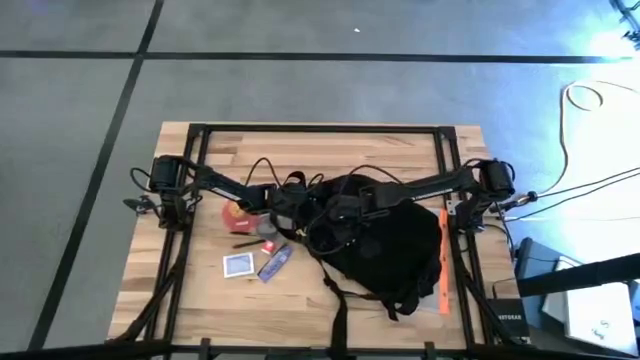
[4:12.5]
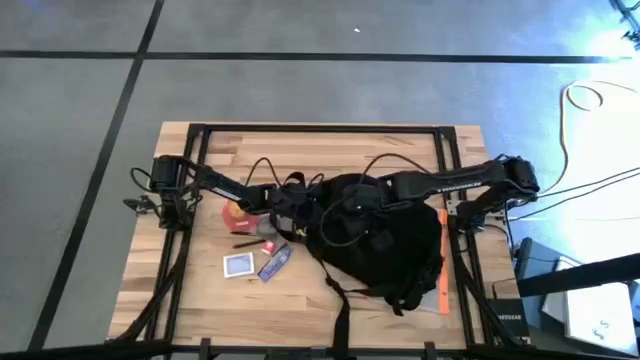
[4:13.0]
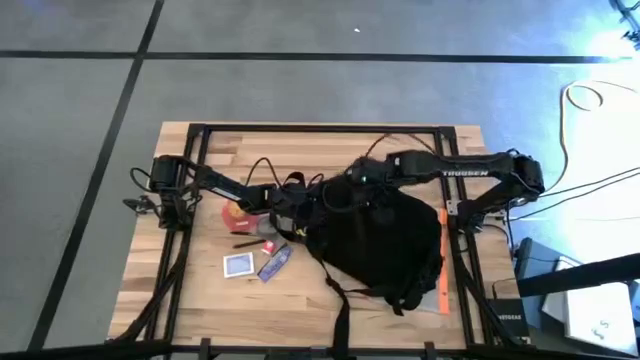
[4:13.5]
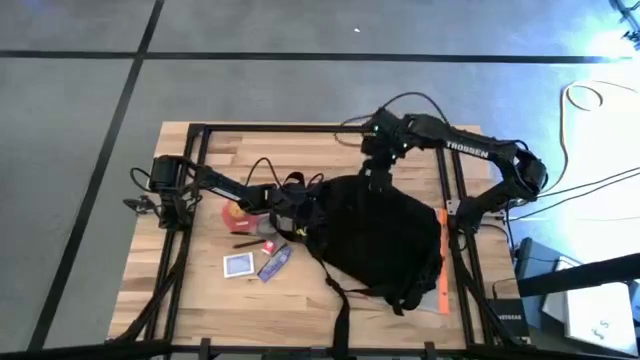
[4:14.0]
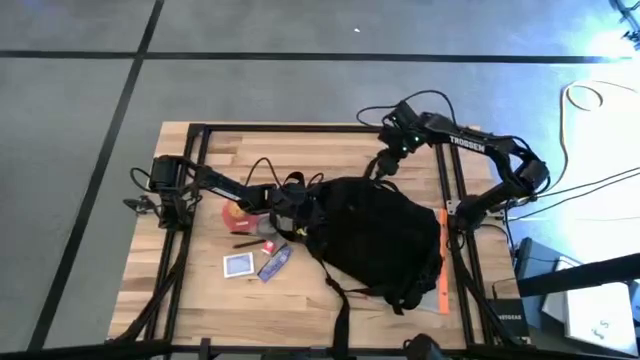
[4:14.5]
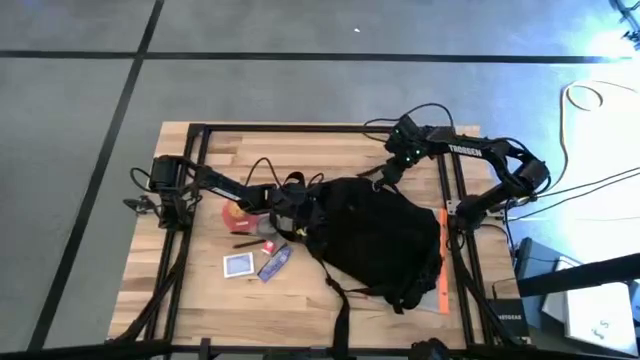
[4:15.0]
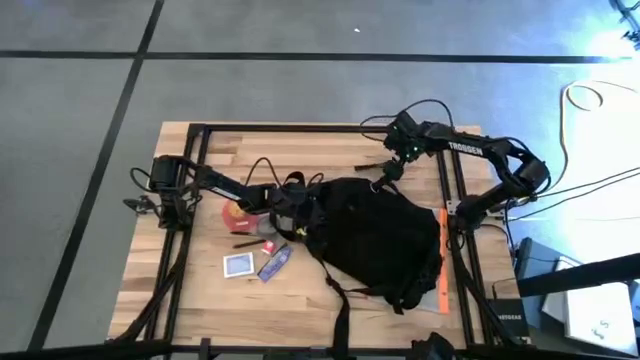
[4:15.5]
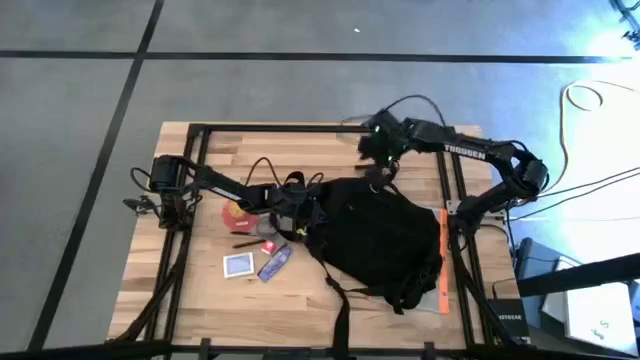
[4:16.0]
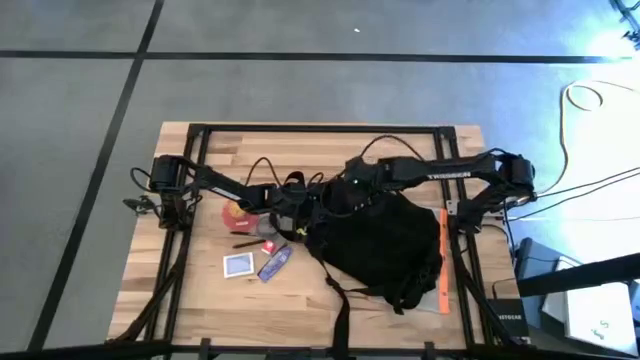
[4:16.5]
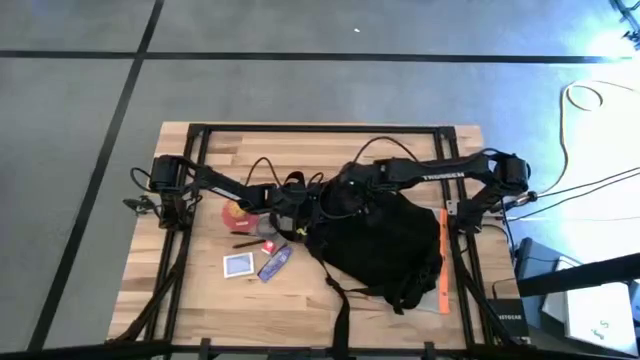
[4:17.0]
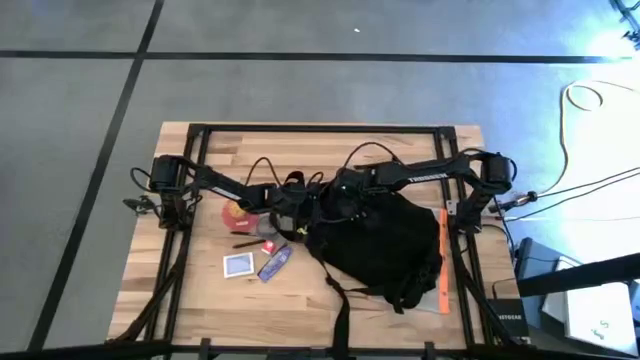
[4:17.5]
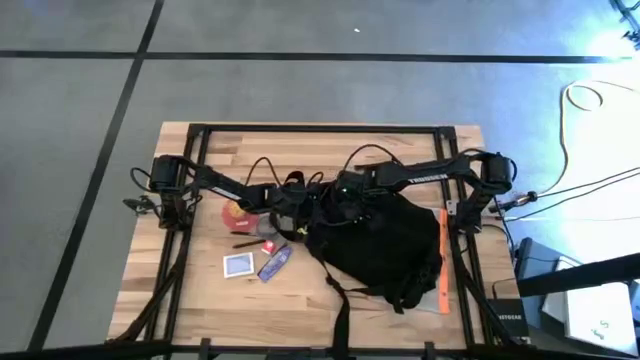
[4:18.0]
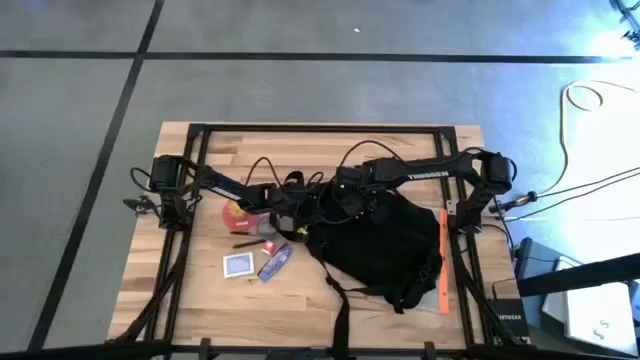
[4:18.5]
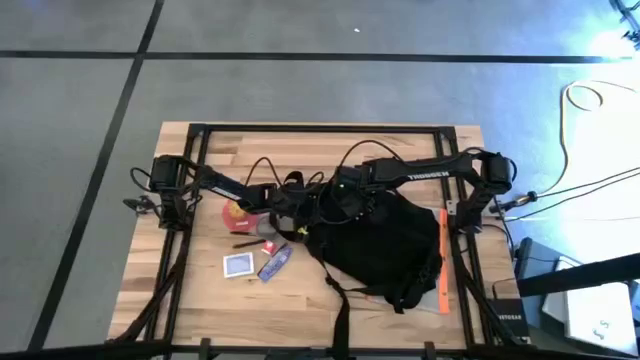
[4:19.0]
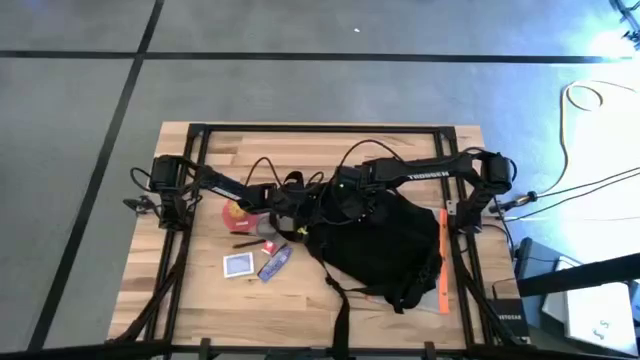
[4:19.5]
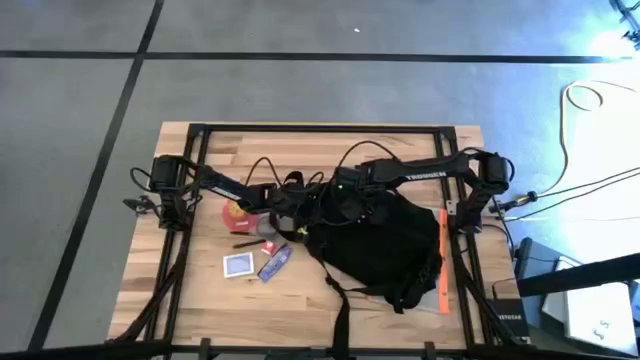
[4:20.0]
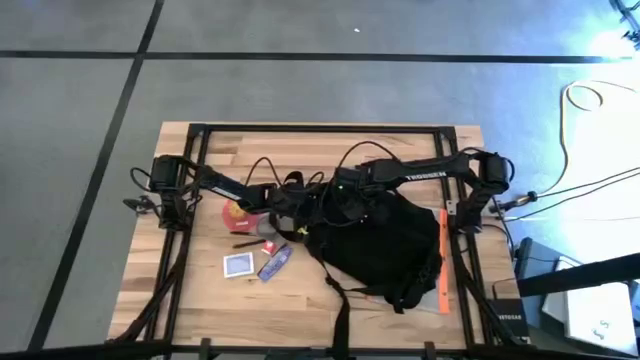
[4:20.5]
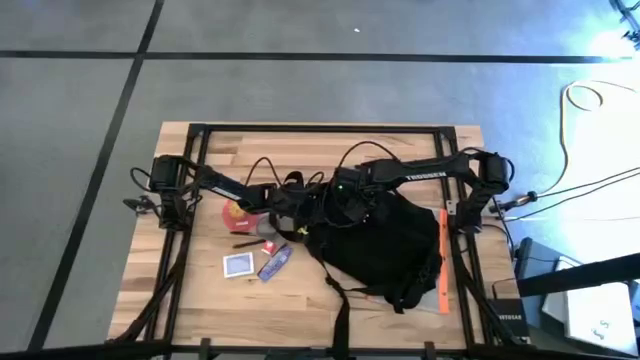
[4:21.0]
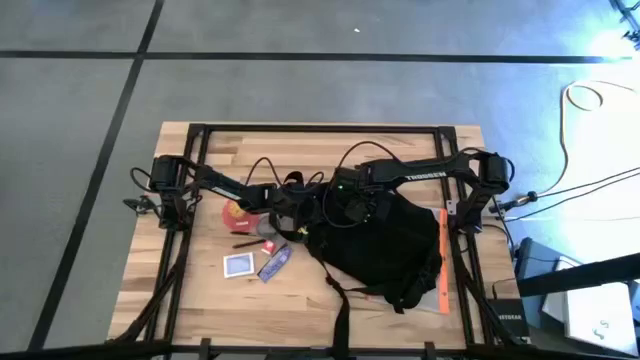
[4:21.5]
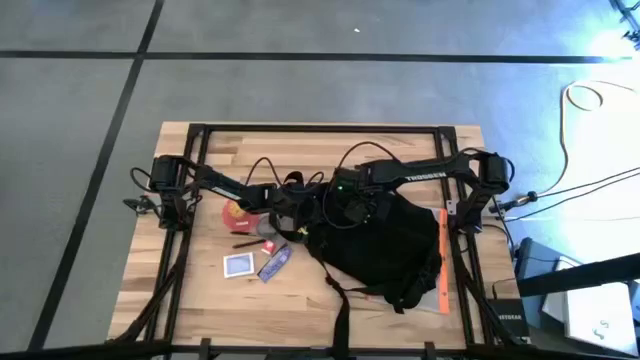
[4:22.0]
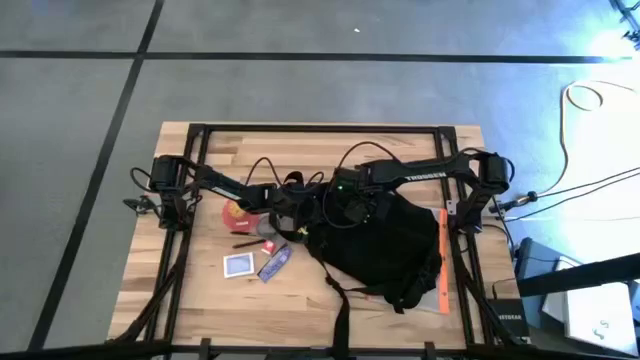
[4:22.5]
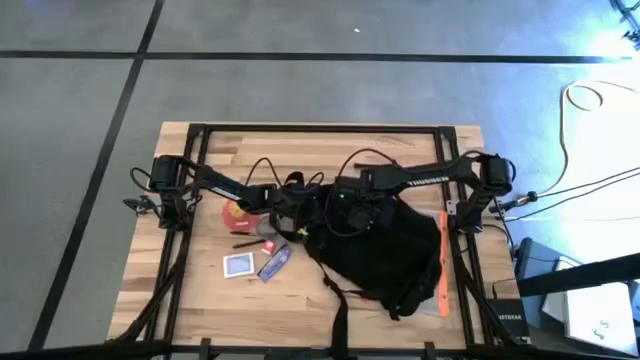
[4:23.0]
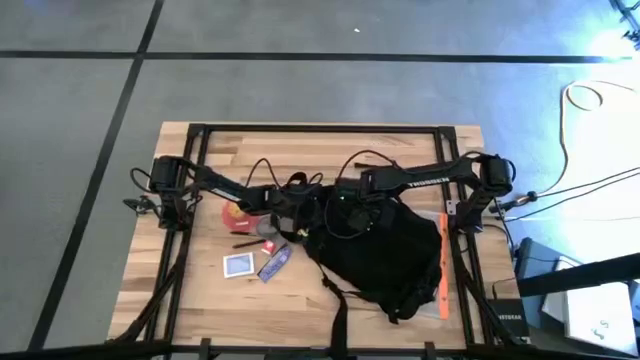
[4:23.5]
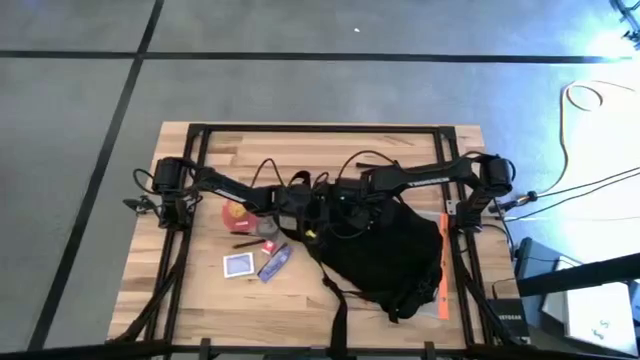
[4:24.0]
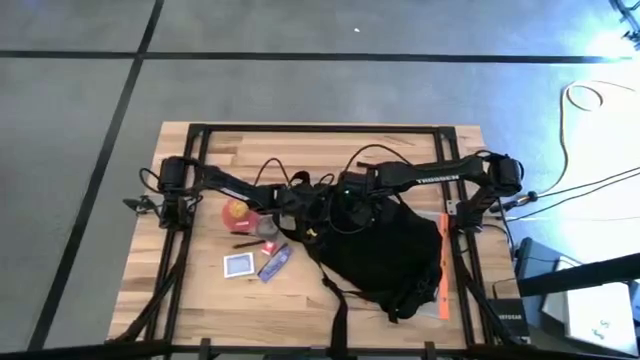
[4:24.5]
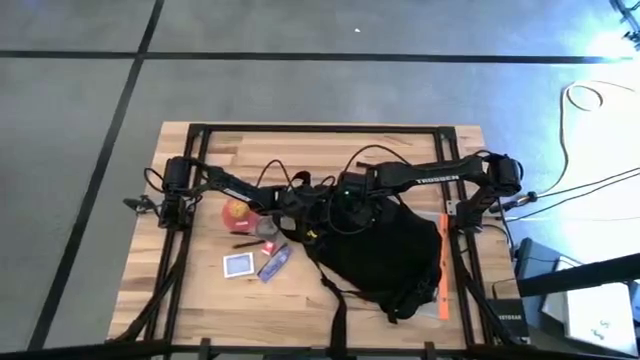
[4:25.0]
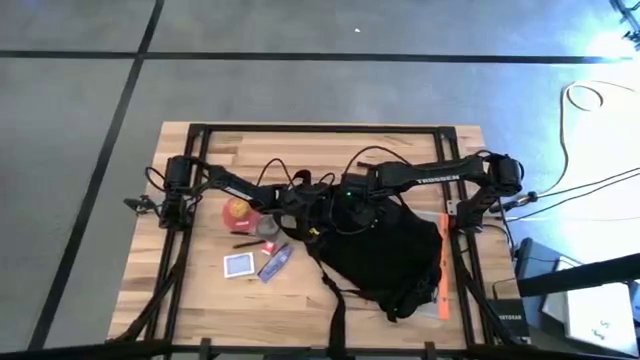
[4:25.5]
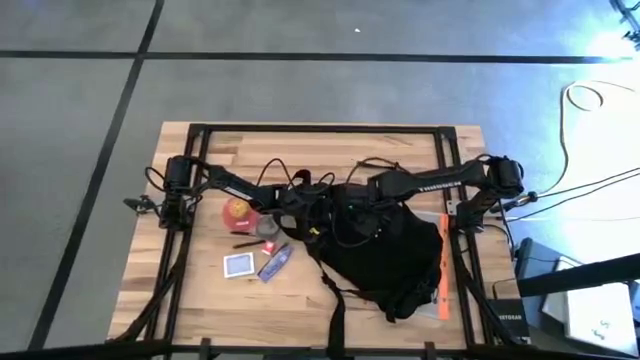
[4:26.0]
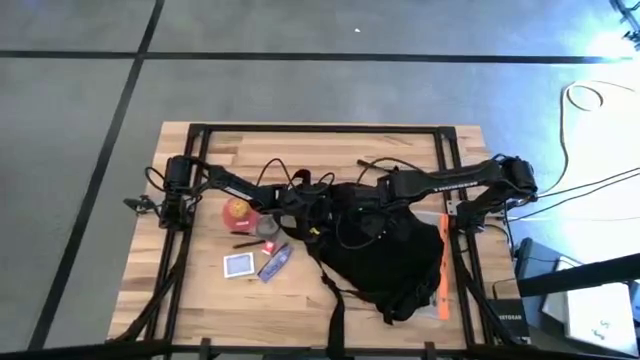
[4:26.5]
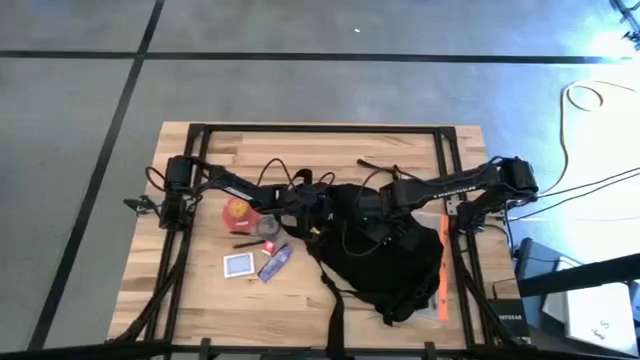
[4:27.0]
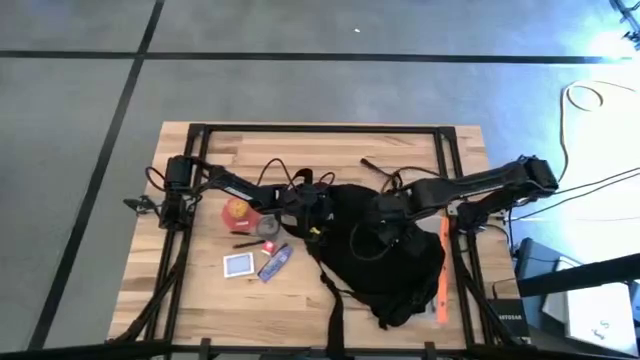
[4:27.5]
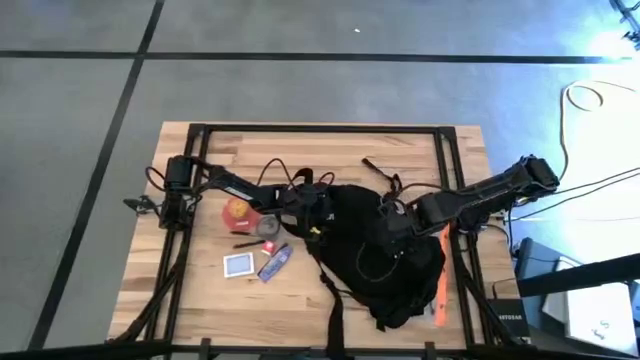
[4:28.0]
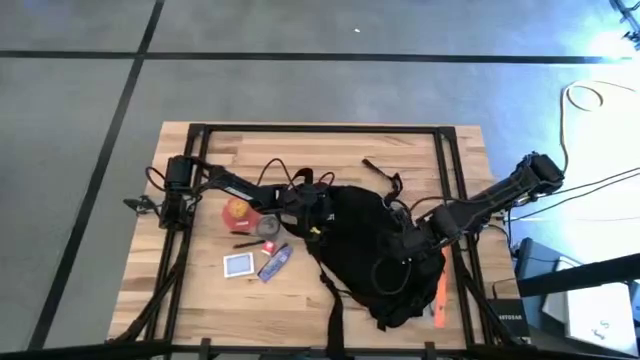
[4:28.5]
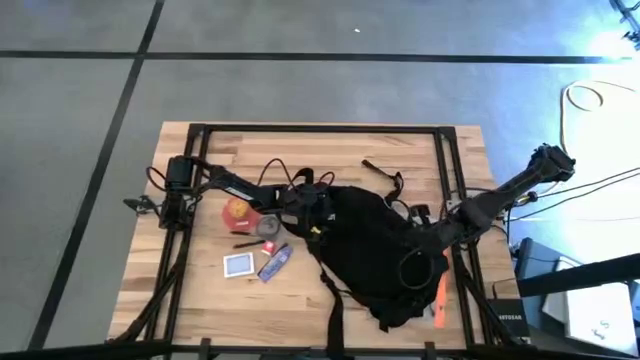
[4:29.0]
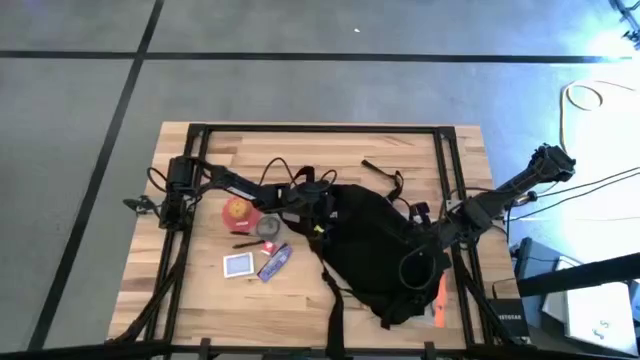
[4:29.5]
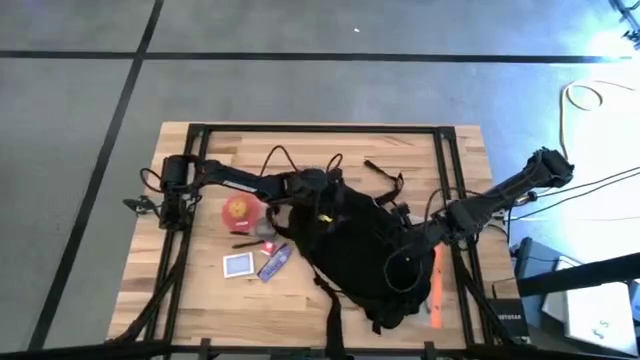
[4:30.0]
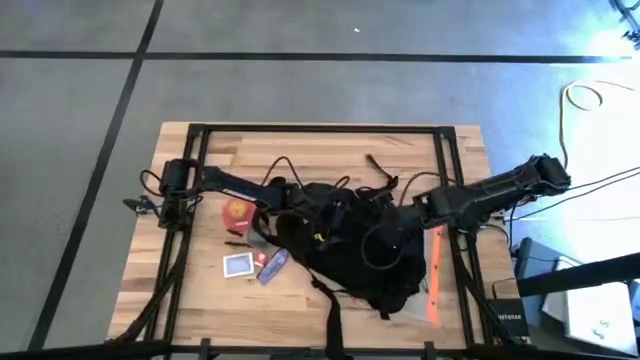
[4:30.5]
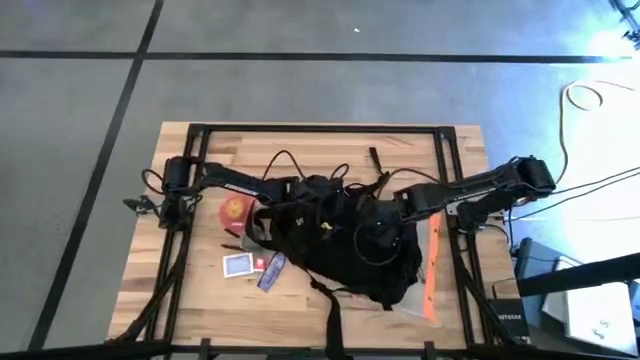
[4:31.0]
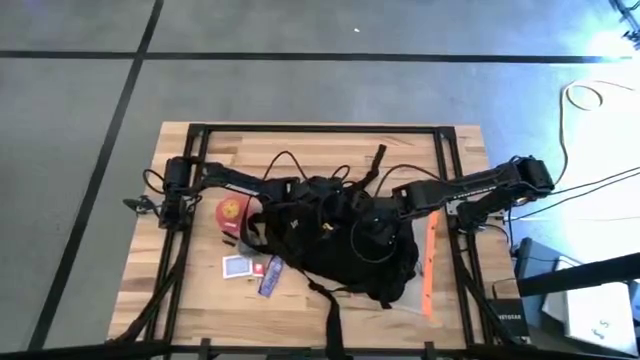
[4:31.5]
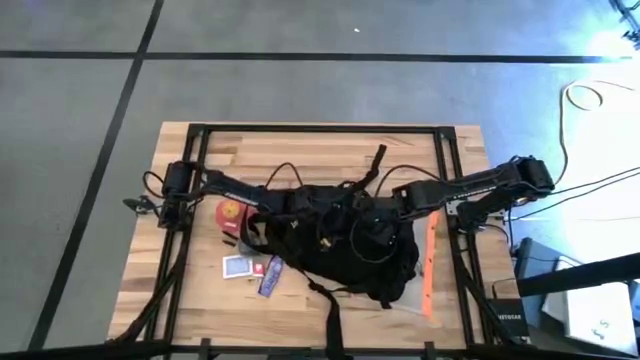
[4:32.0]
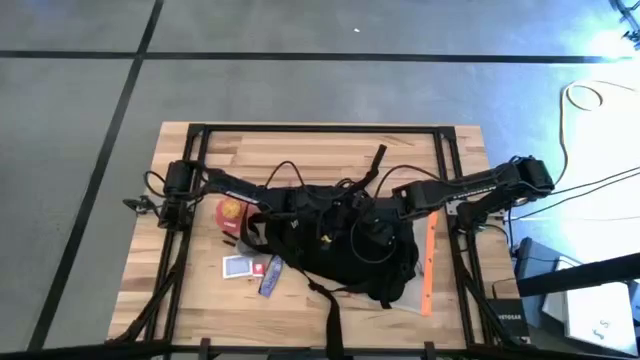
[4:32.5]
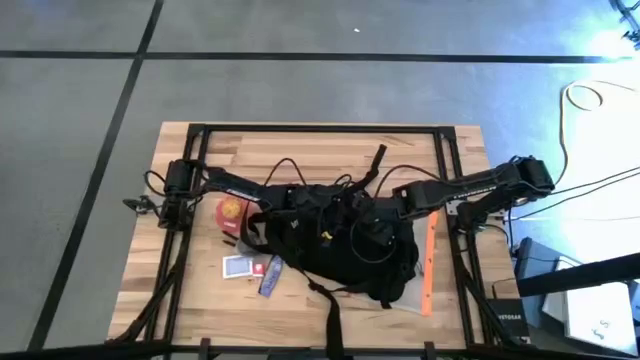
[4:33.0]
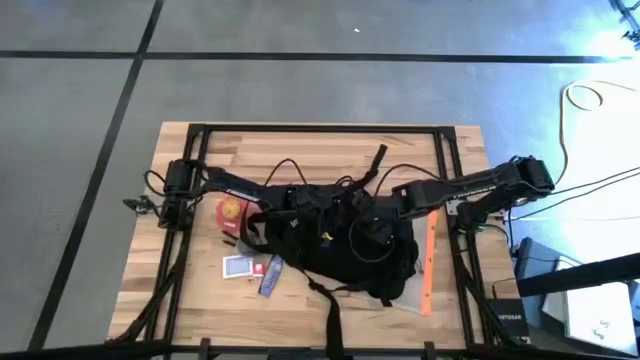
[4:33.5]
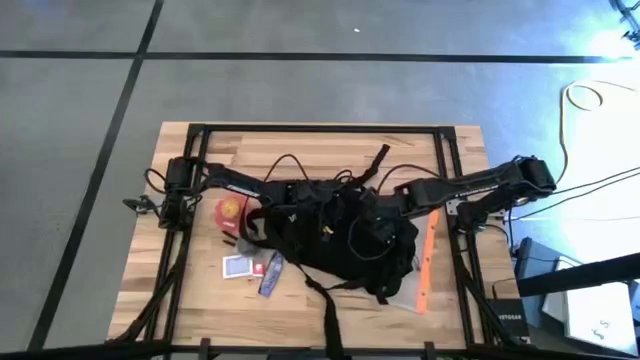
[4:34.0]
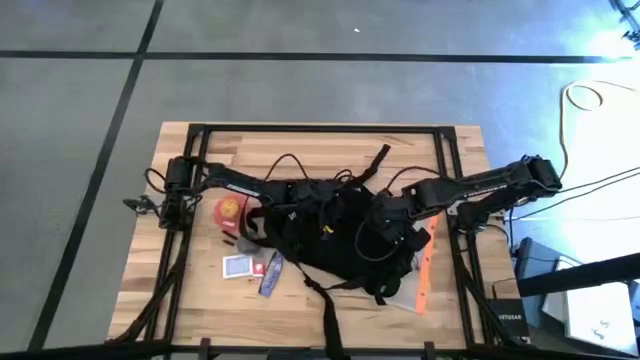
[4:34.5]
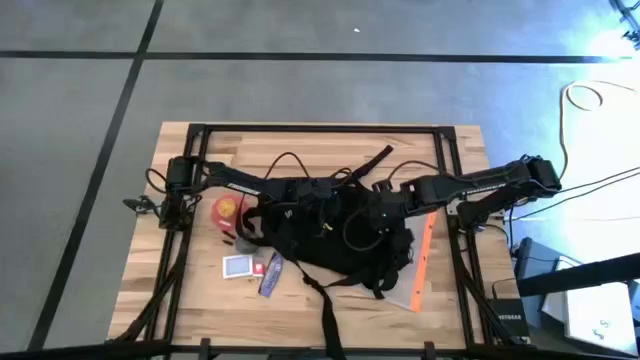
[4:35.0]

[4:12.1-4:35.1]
Task: Unpack backpack
Open the black backpack
